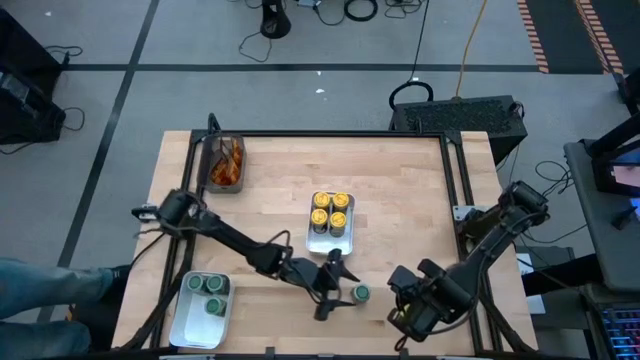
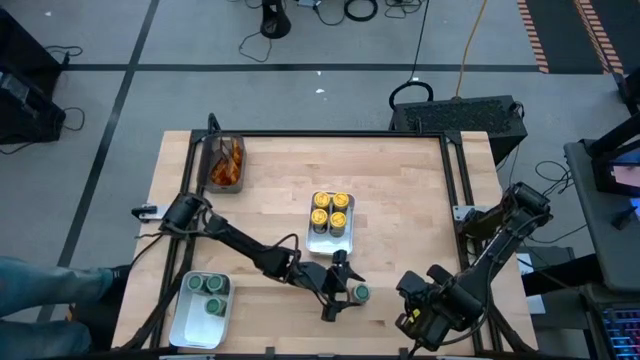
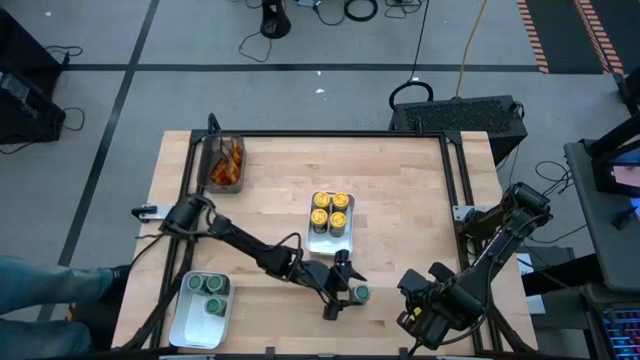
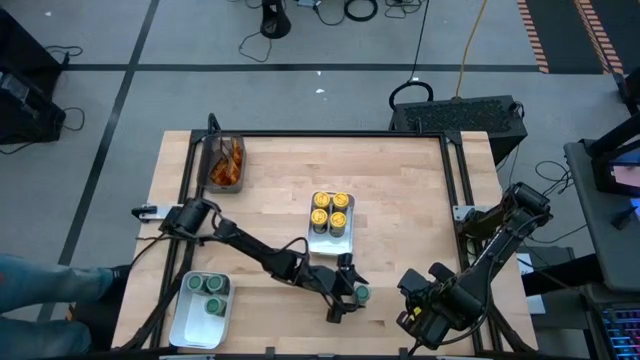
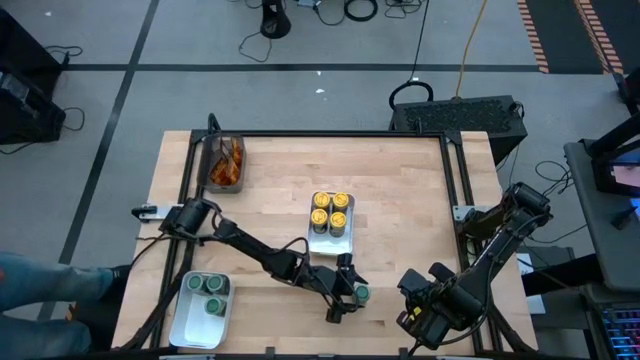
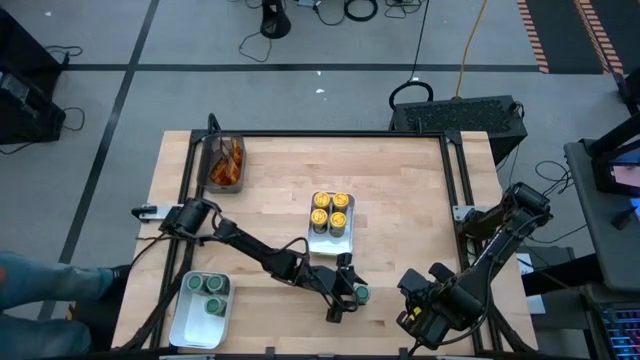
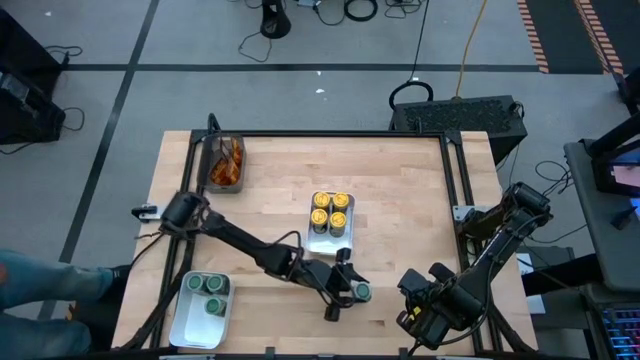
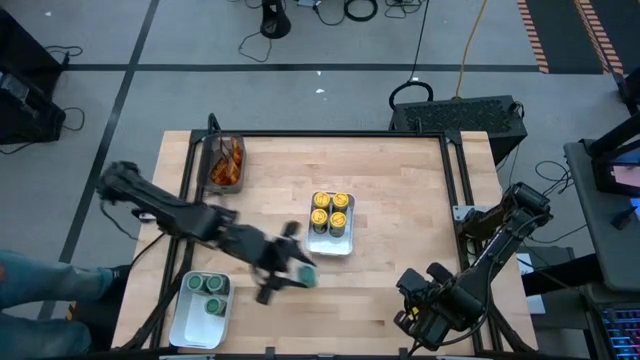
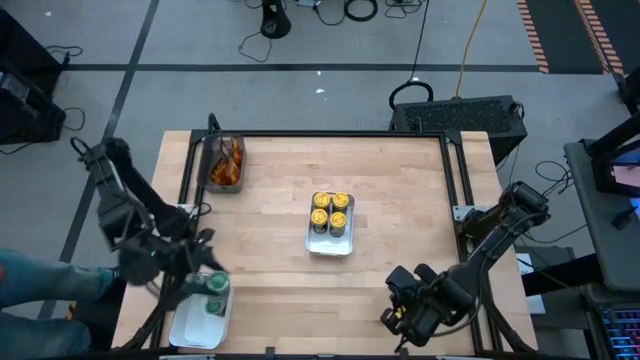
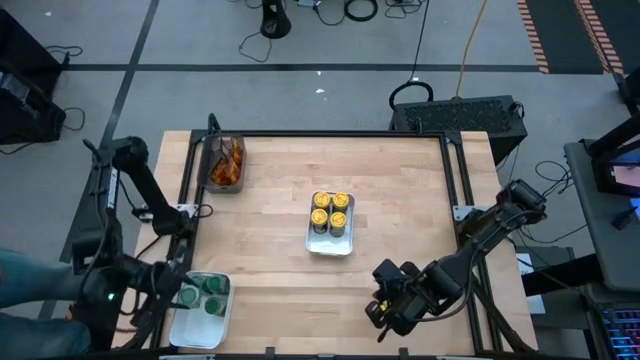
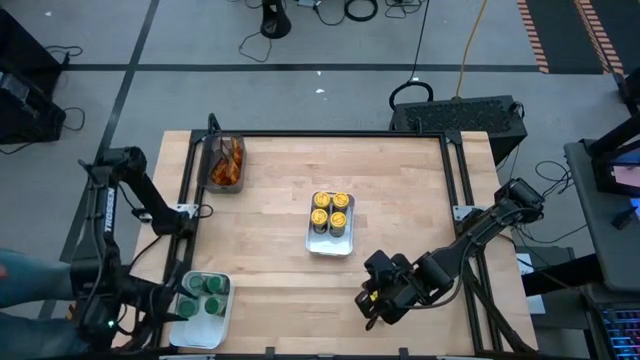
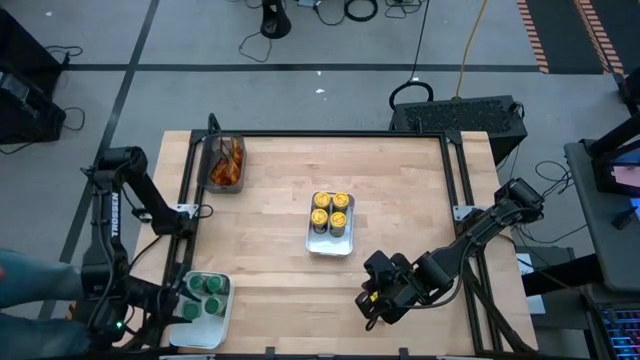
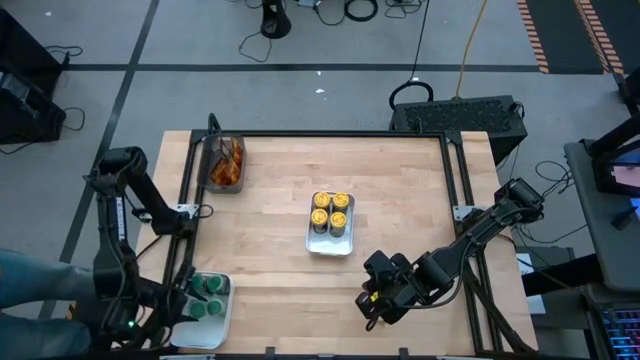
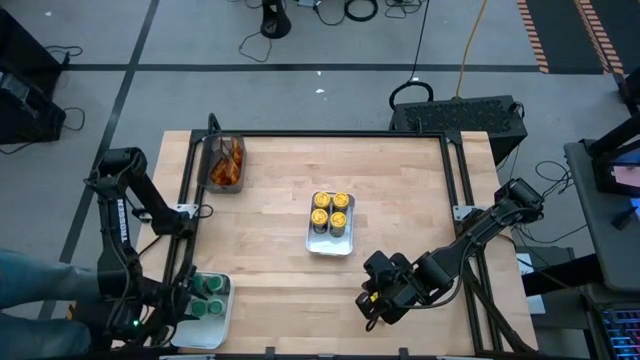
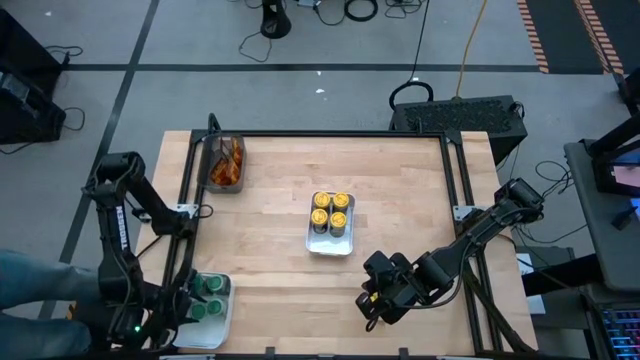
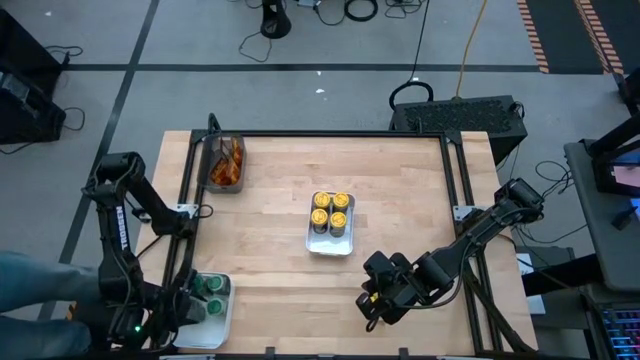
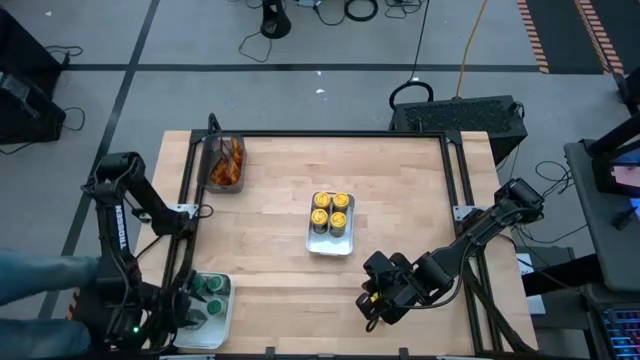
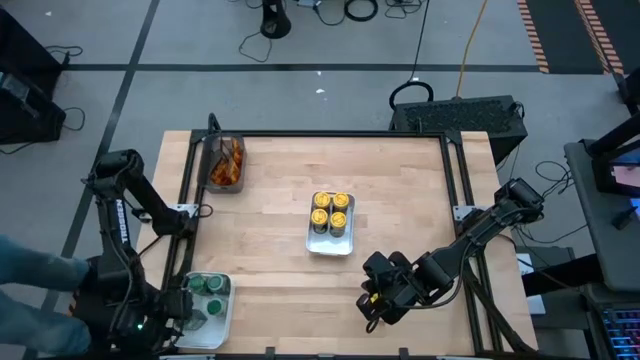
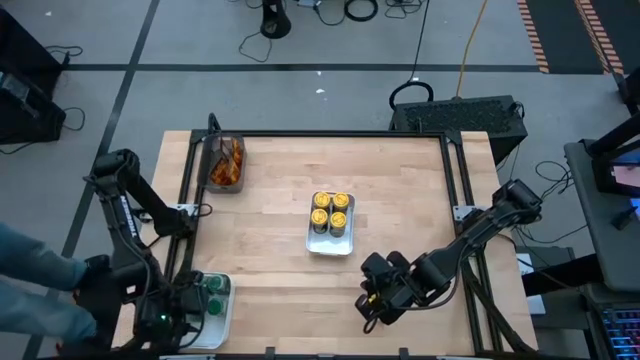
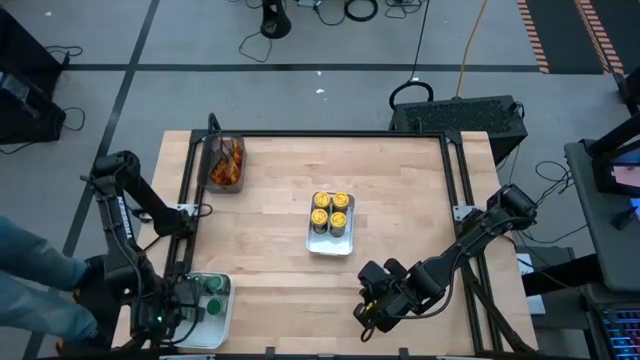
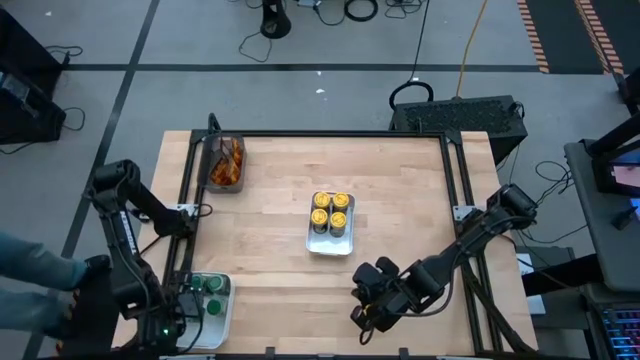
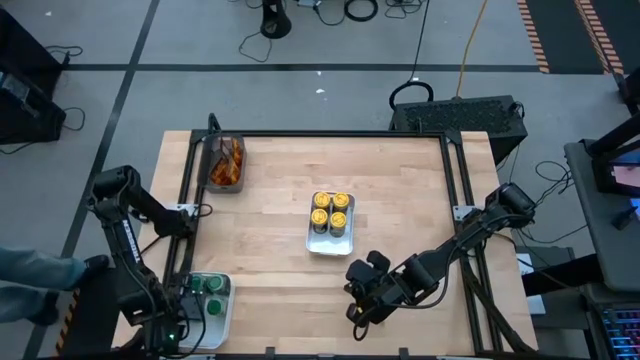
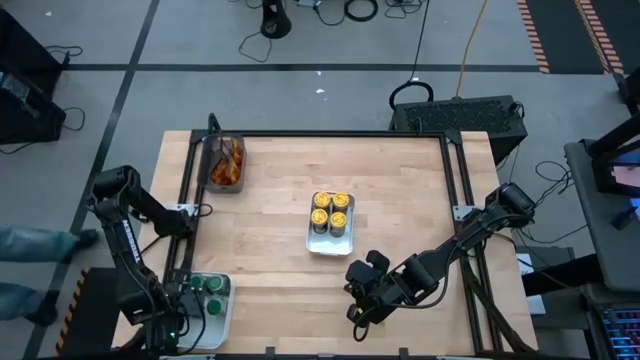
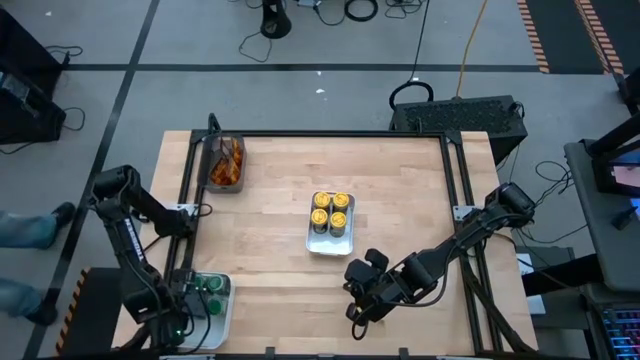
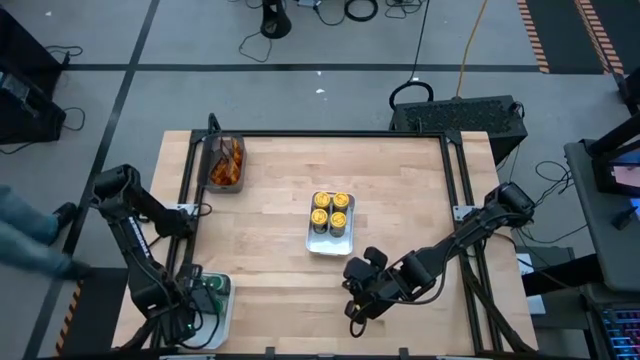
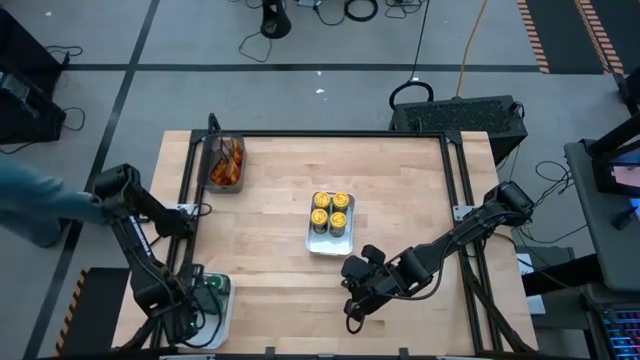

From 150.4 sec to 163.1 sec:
Task: Sort spices by type
Put the green spice bottle into the bottom white bin
